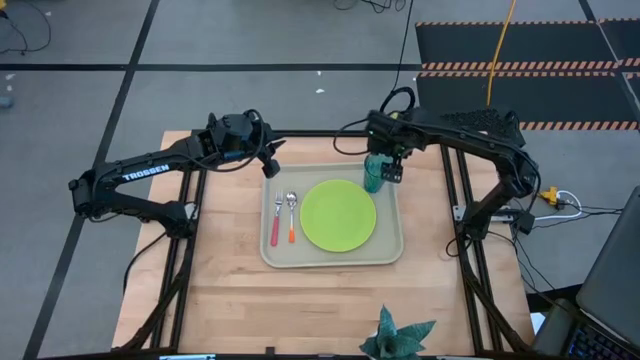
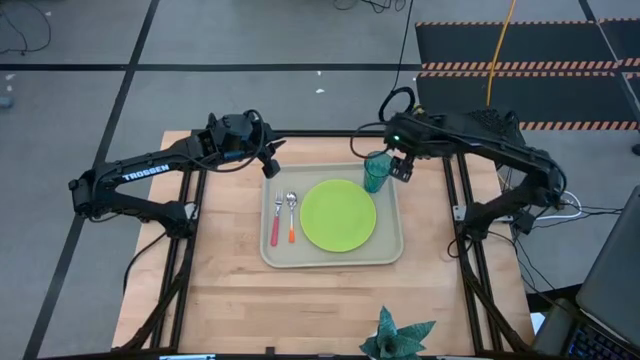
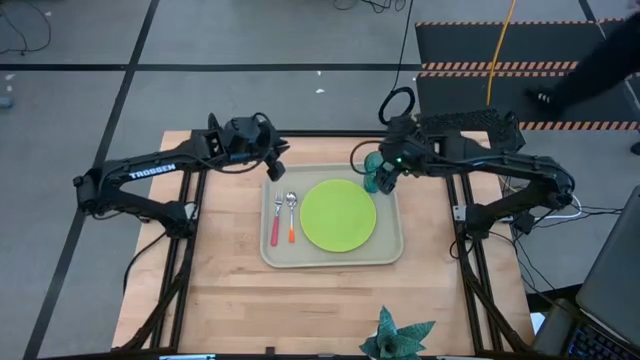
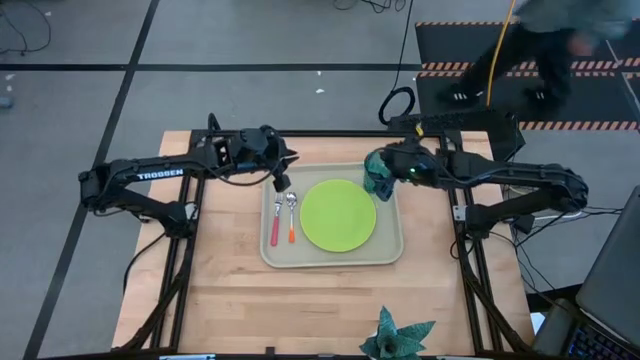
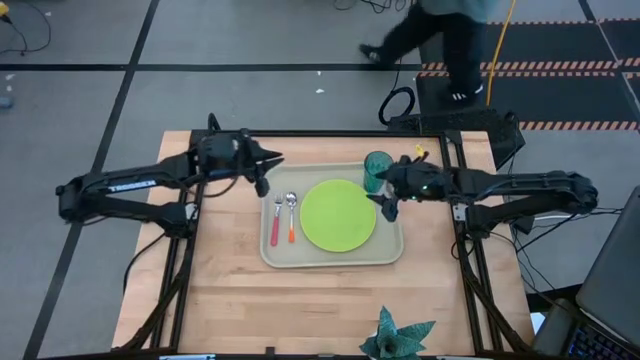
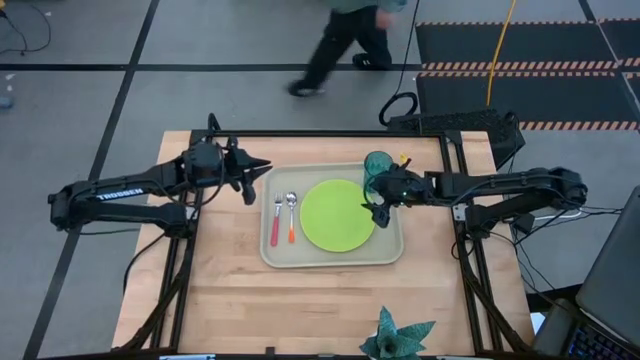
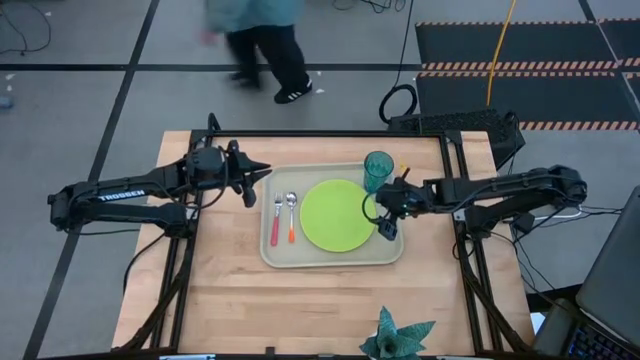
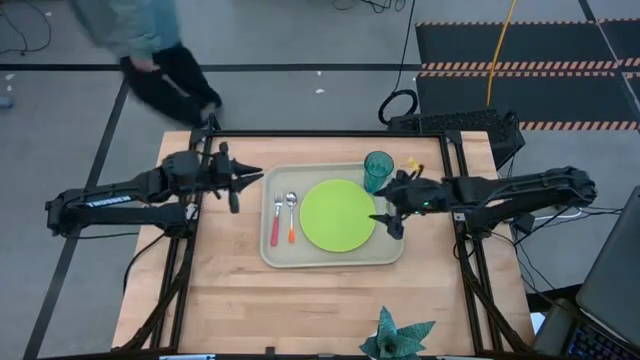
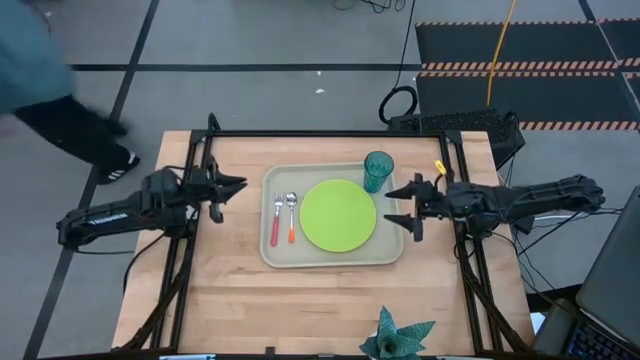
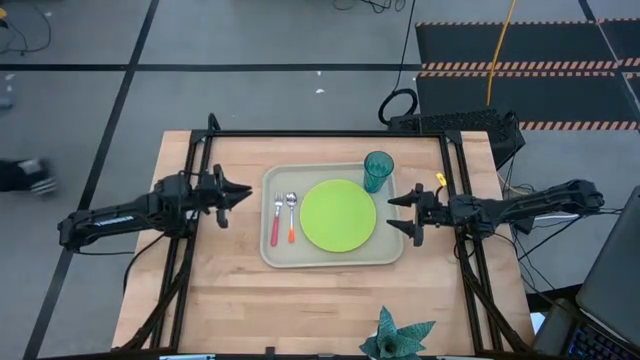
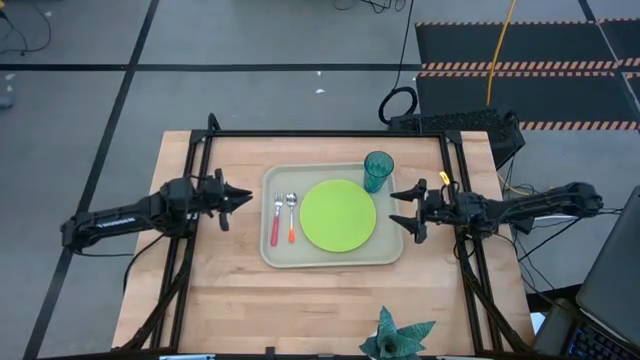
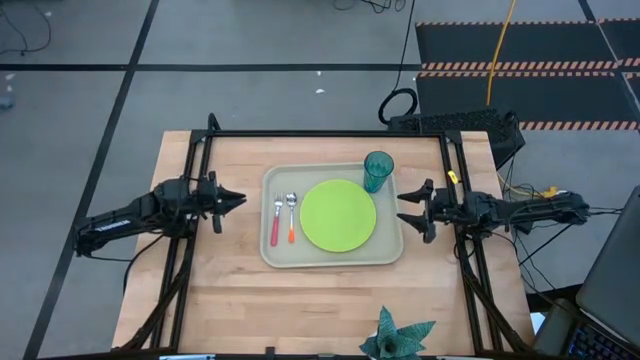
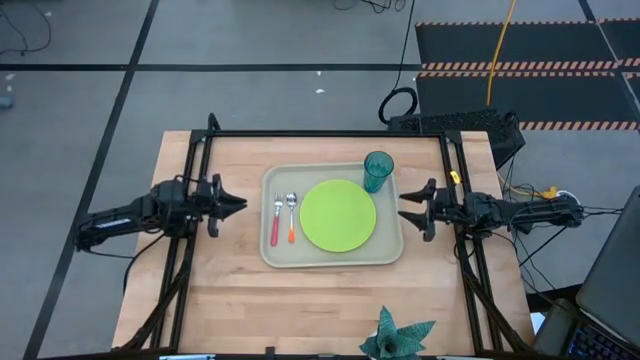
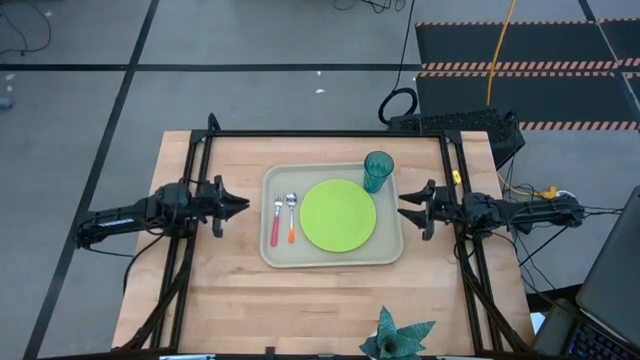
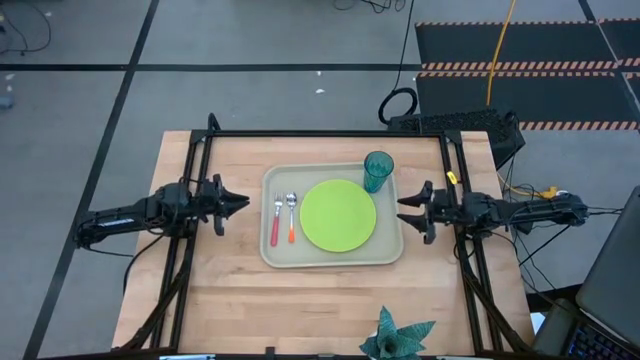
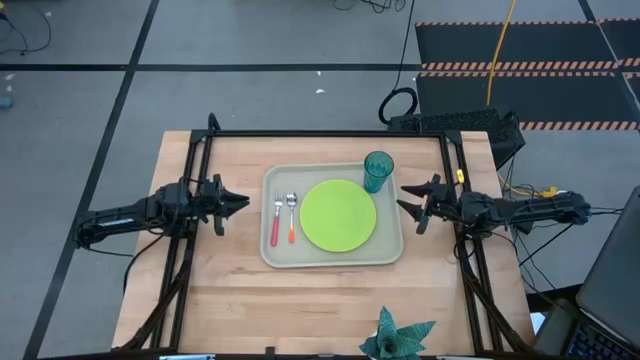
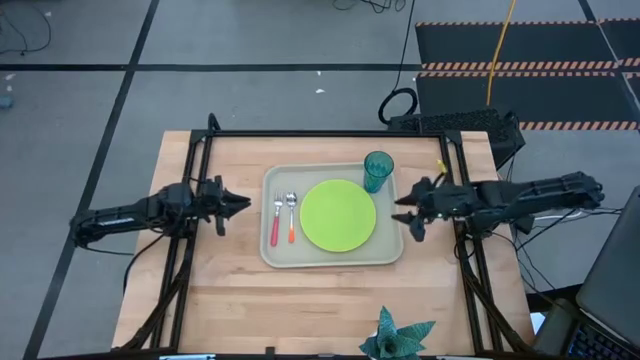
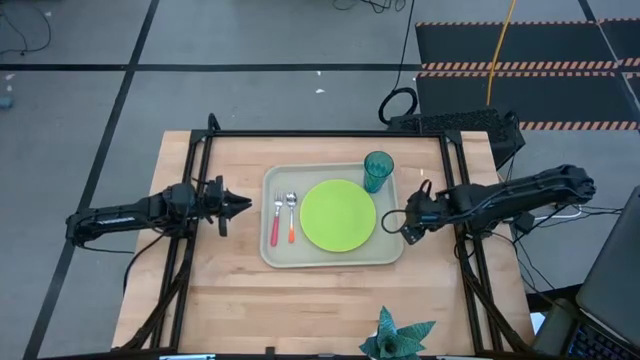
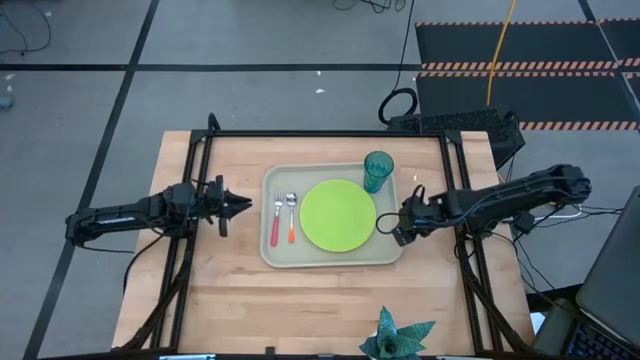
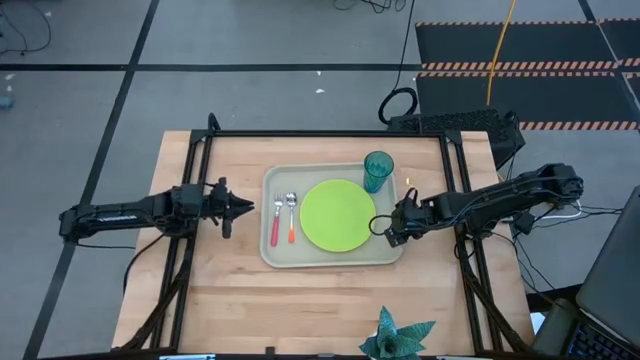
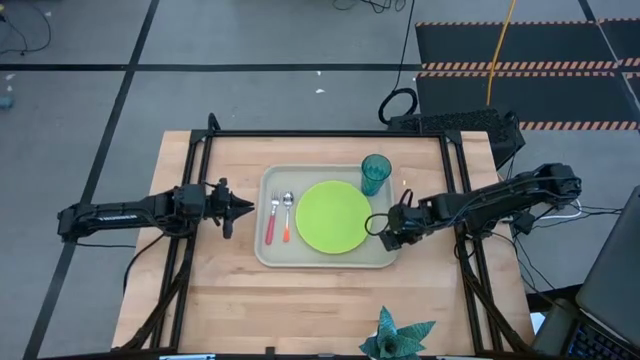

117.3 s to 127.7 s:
Task: Pick and place plate/cup/fork/spoon on tray
Adjust the light brown serving tray

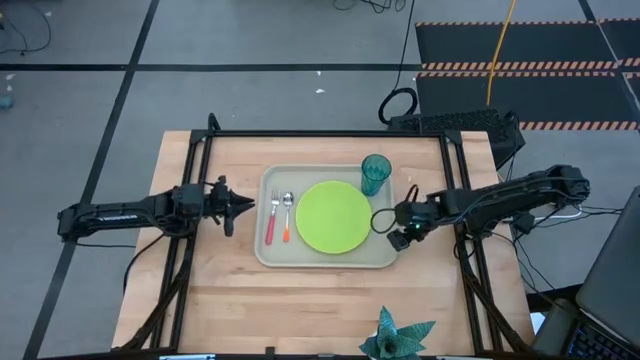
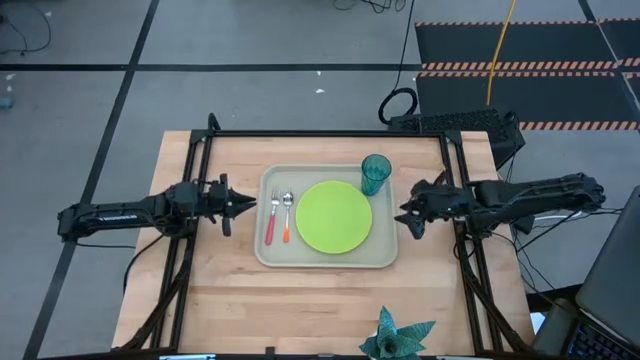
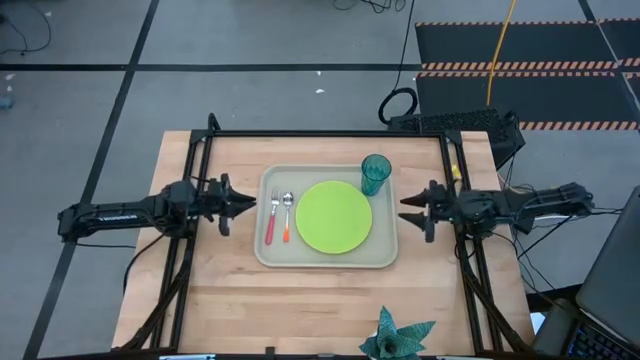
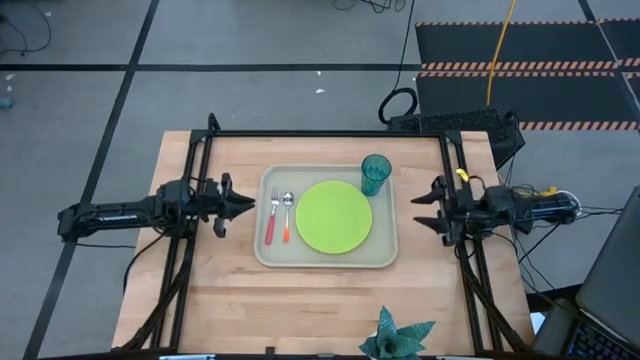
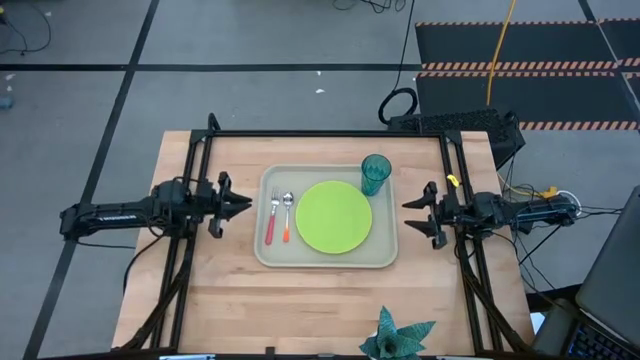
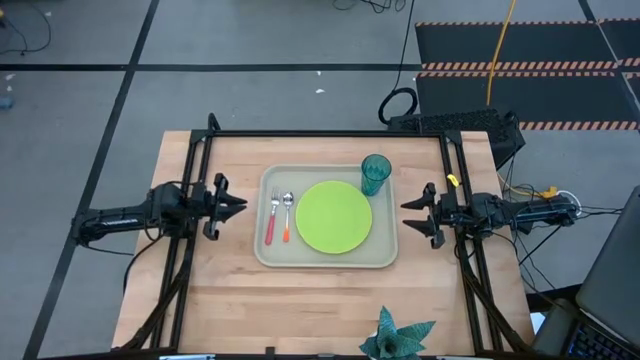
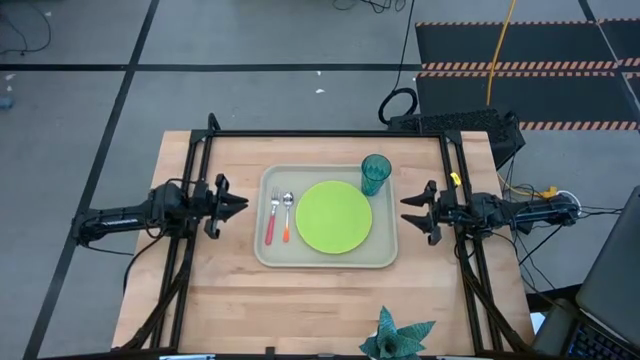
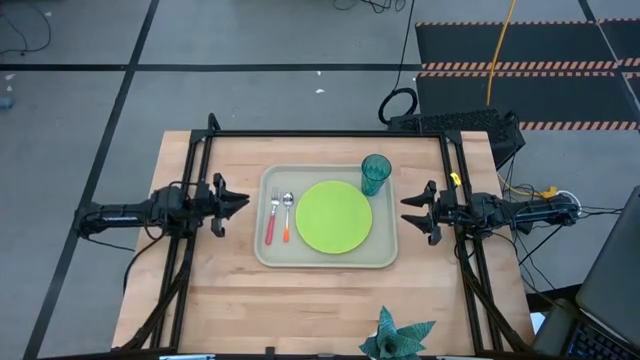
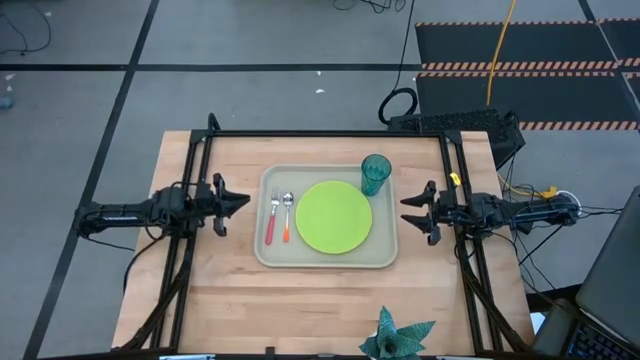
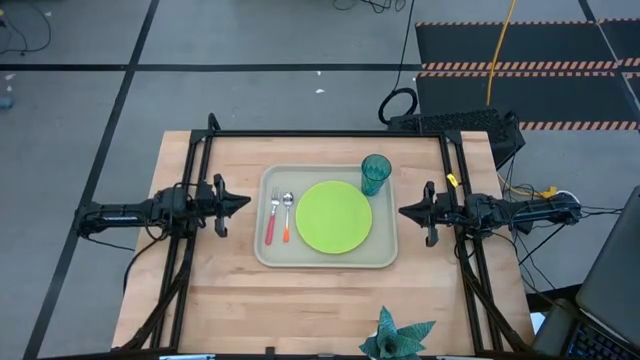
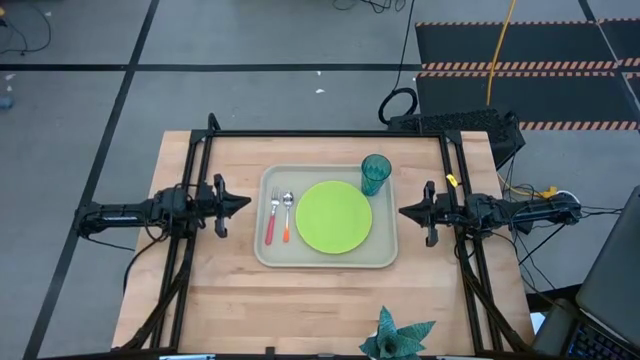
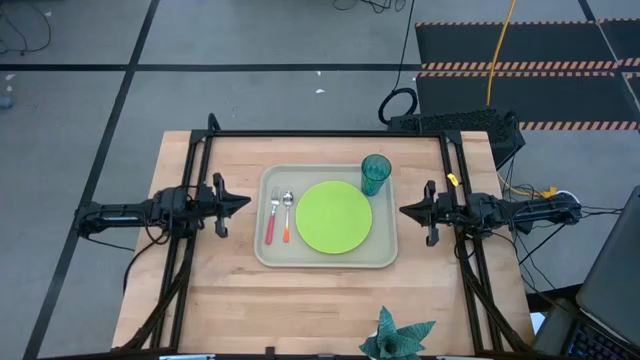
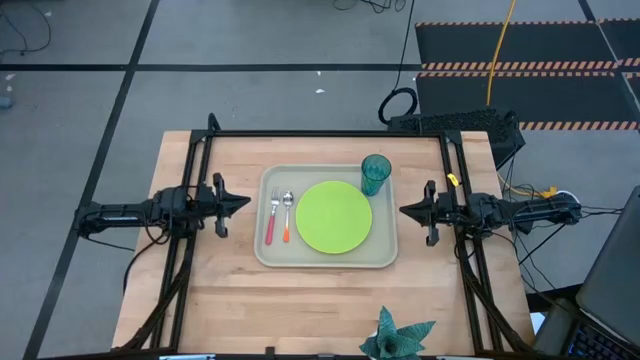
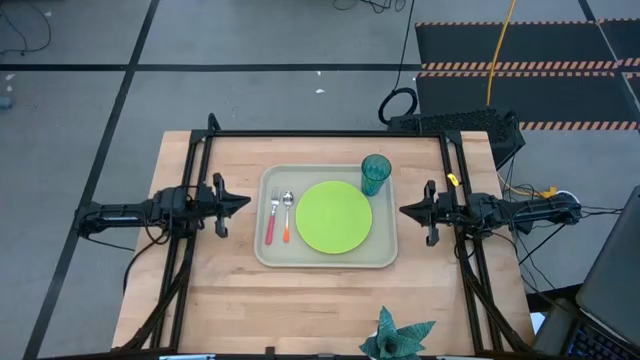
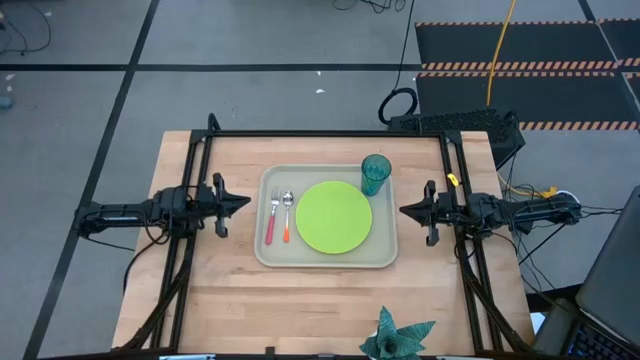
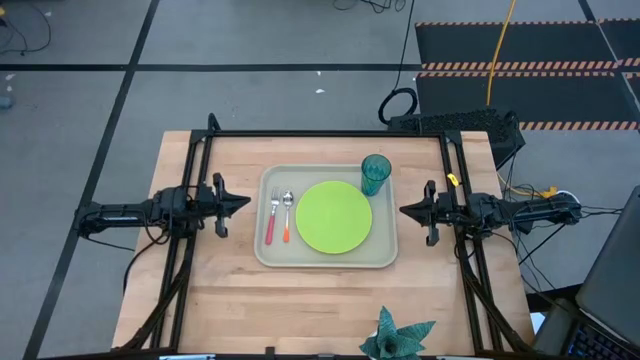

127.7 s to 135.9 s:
Return to Home Position

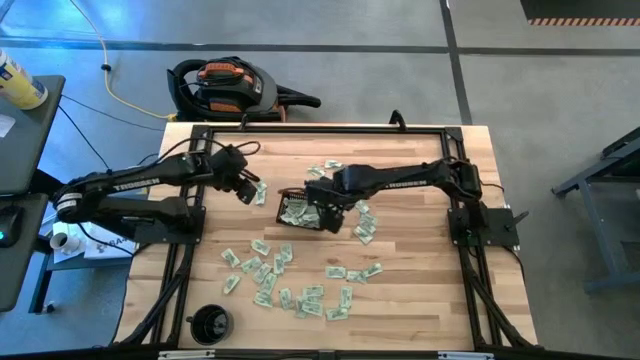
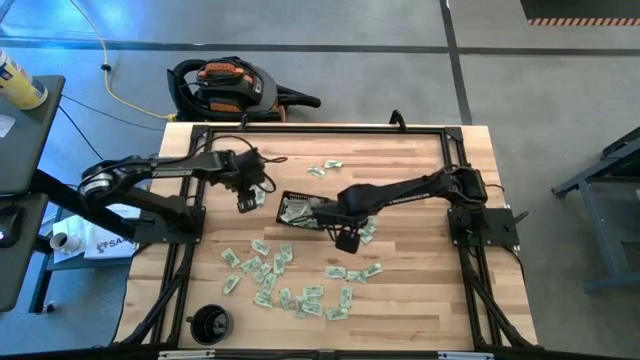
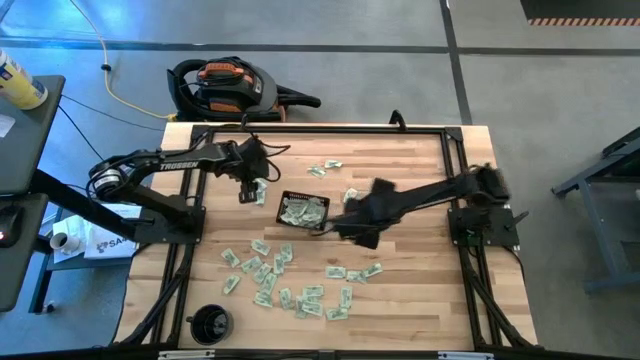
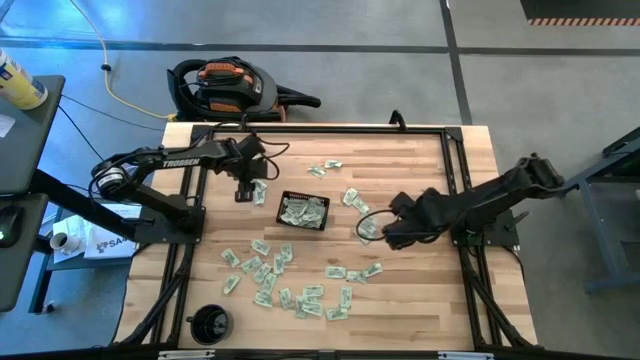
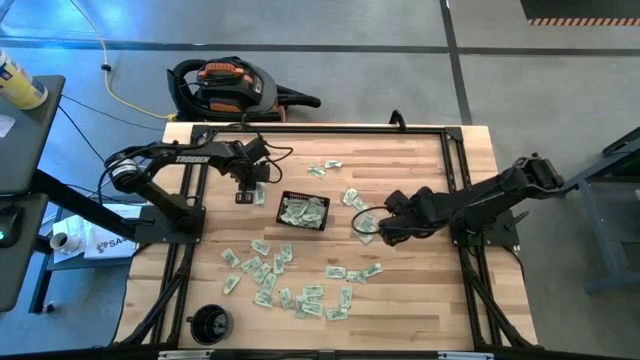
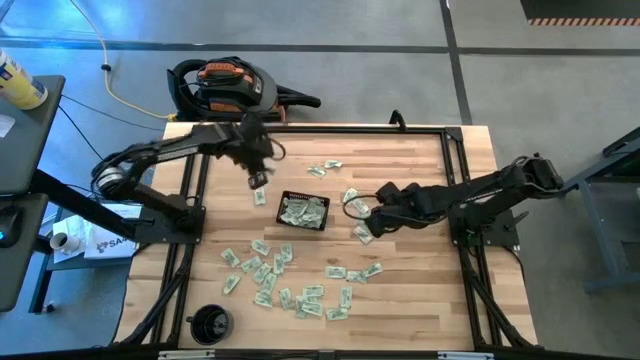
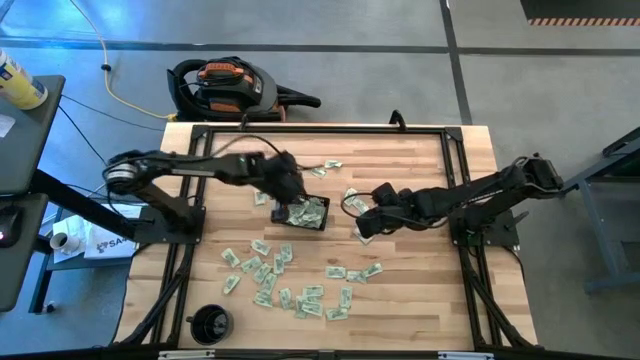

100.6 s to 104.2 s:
Task: Pick and place Stevia / Truvia into bins
Put the green stevia packet into the black basket

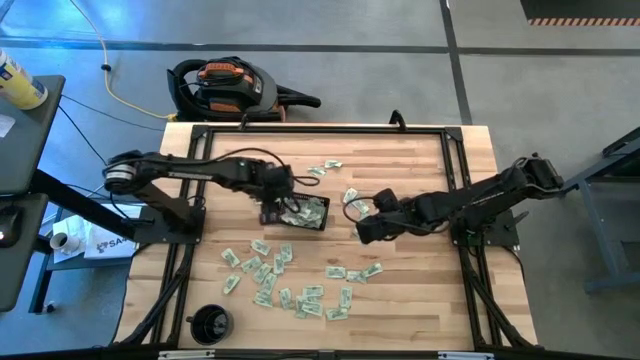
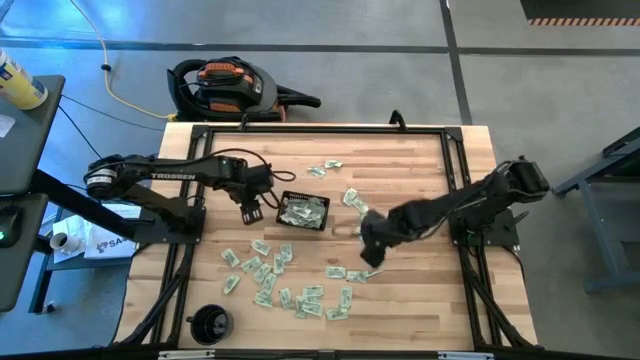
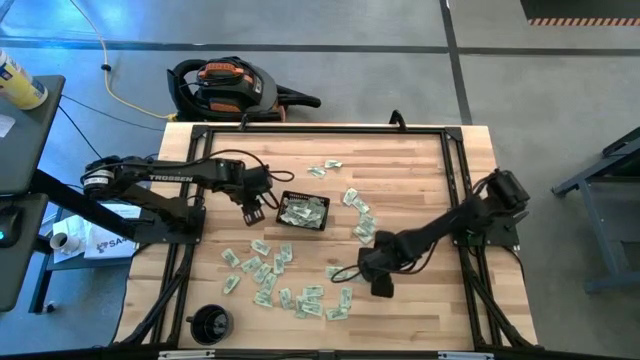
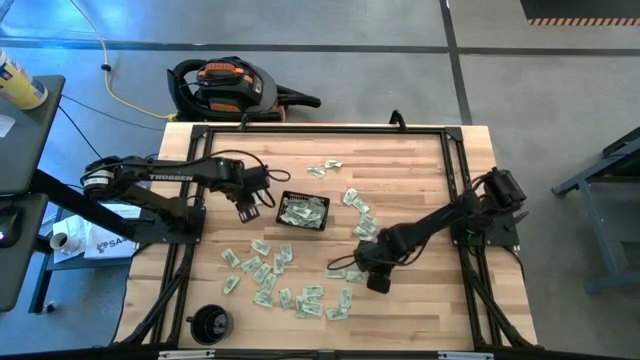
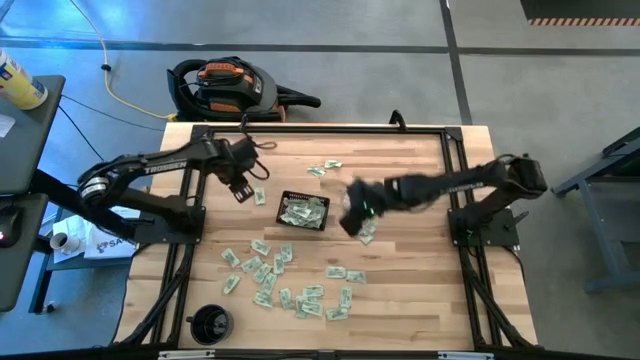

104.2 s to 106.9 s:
Put the green stevia packet into the black basket
